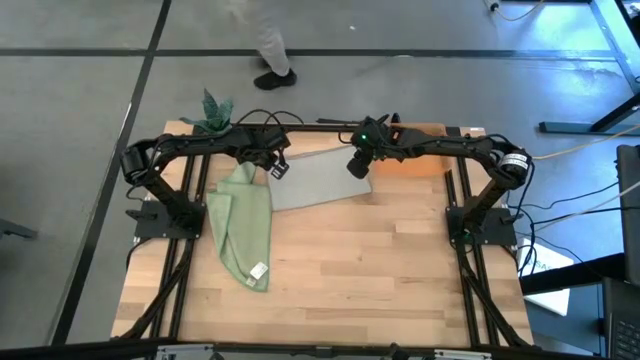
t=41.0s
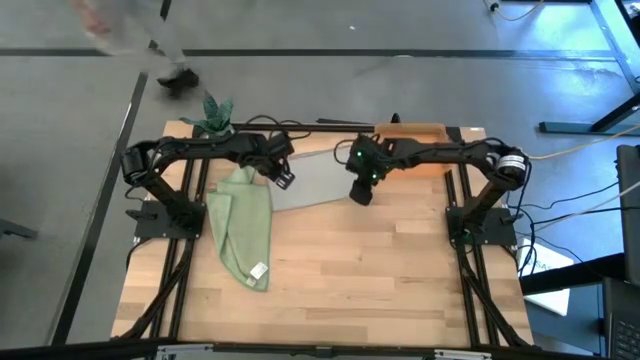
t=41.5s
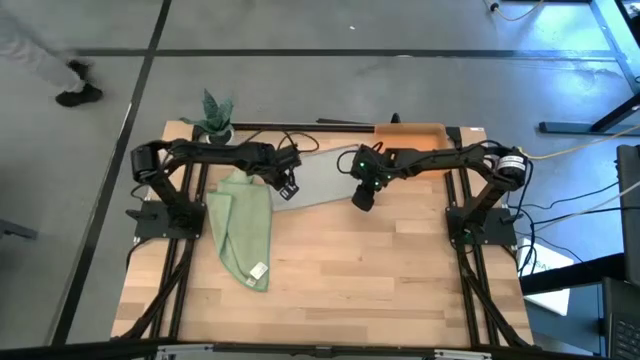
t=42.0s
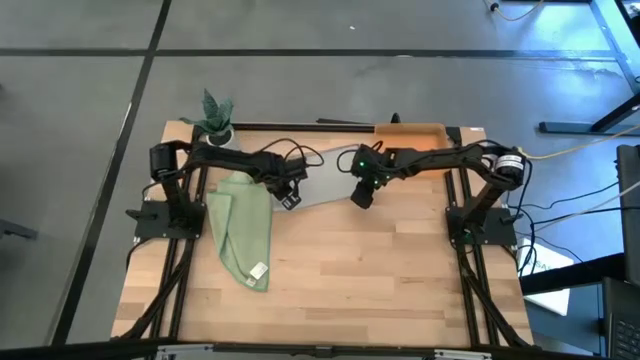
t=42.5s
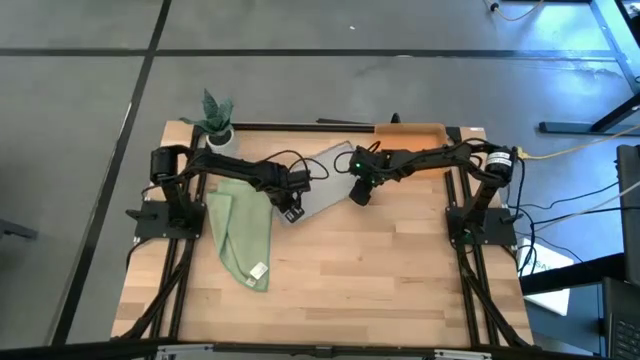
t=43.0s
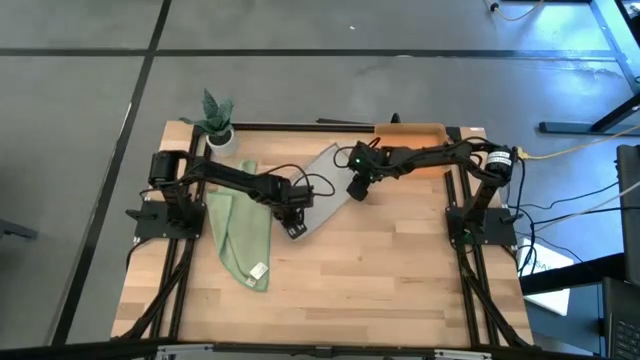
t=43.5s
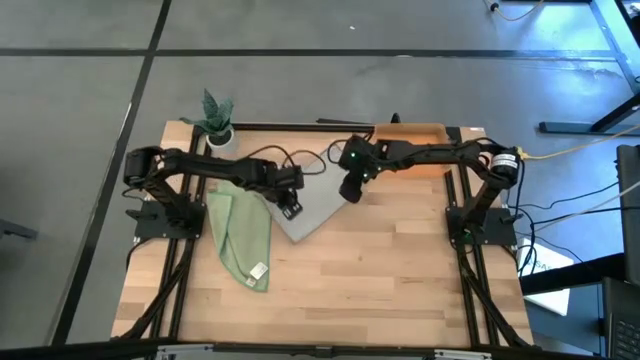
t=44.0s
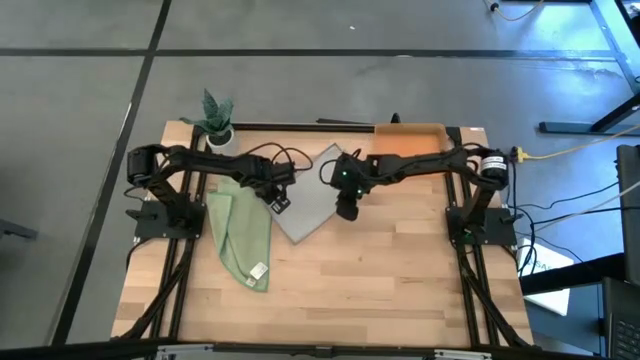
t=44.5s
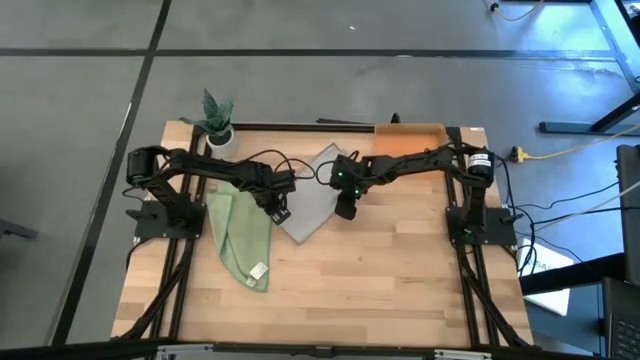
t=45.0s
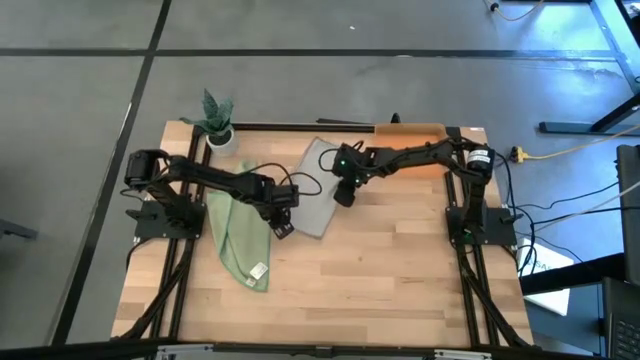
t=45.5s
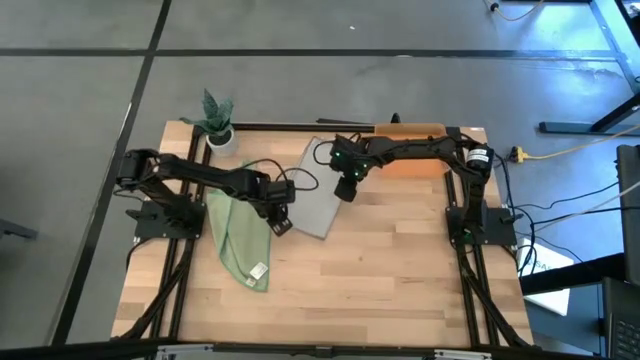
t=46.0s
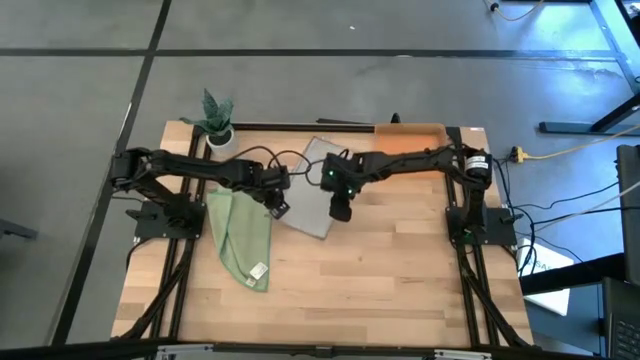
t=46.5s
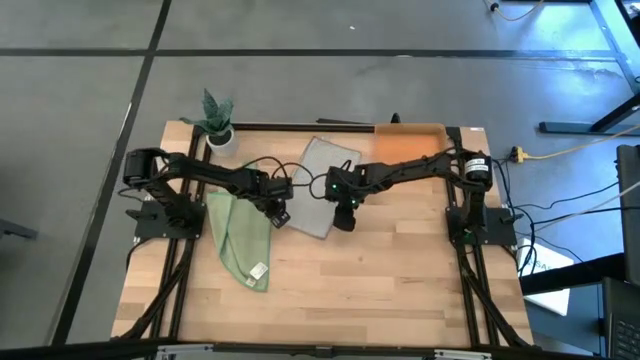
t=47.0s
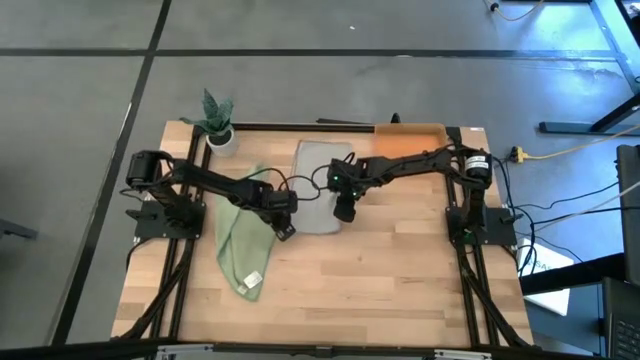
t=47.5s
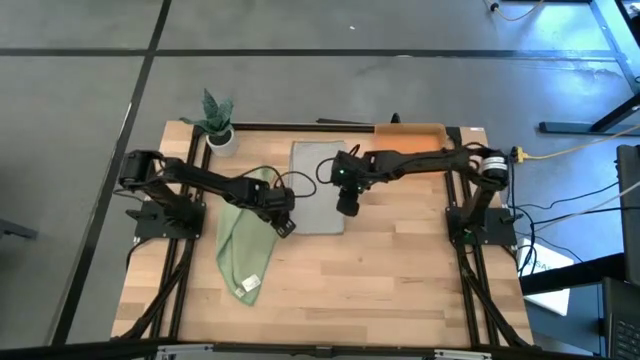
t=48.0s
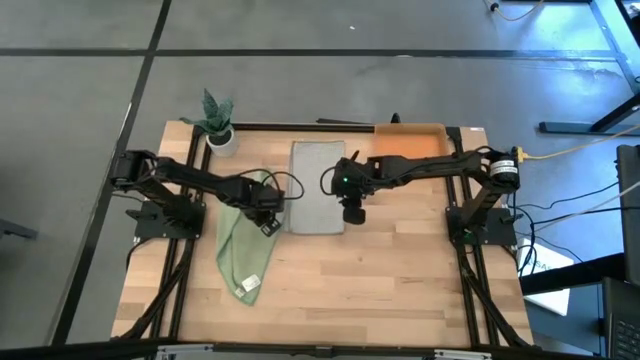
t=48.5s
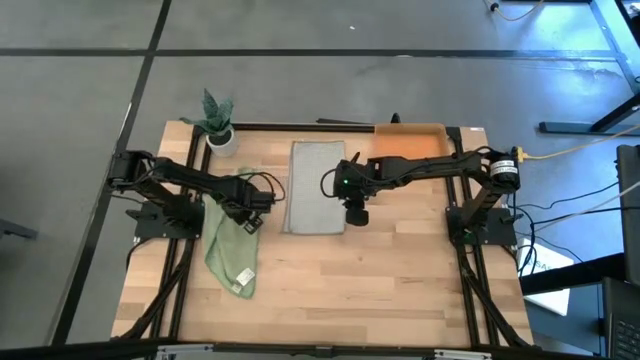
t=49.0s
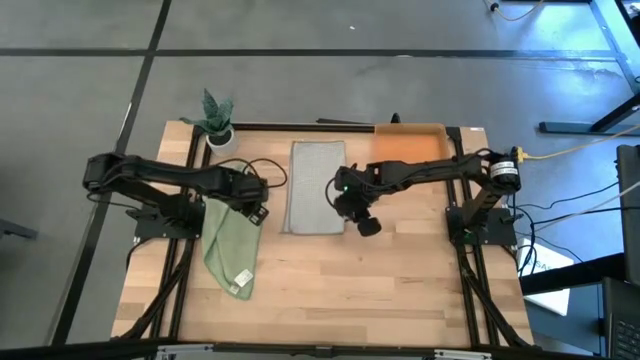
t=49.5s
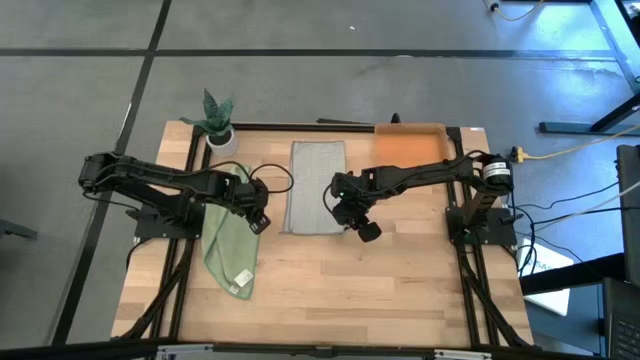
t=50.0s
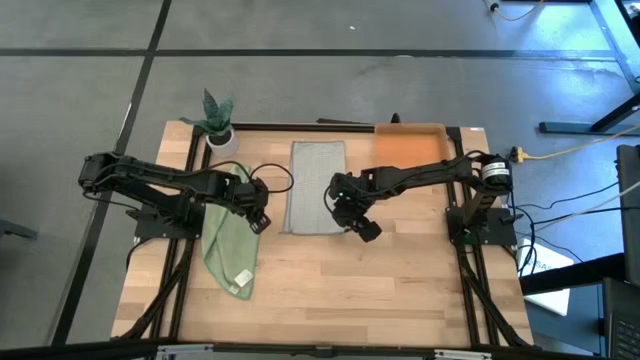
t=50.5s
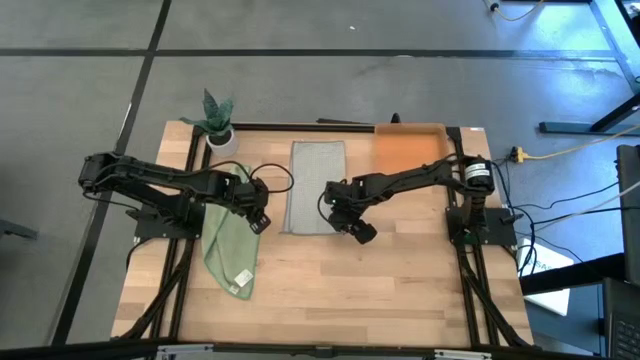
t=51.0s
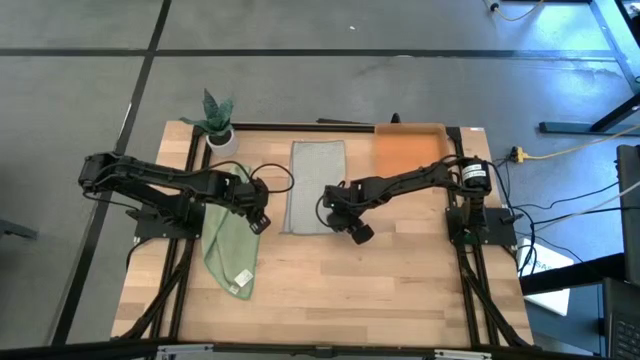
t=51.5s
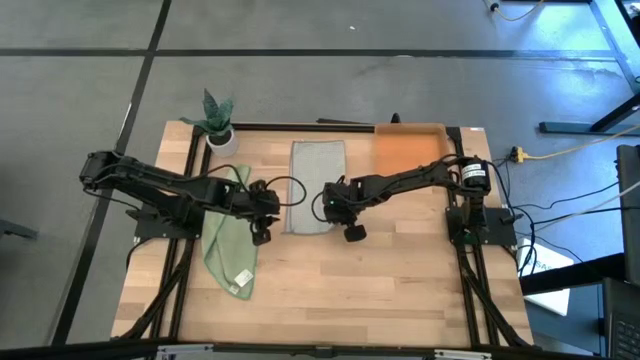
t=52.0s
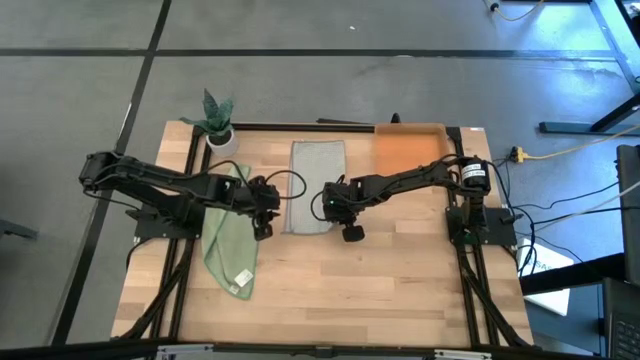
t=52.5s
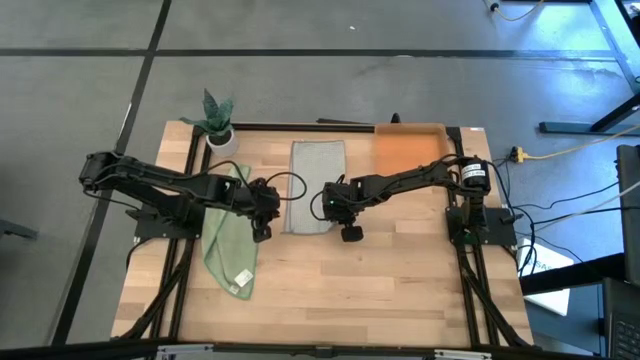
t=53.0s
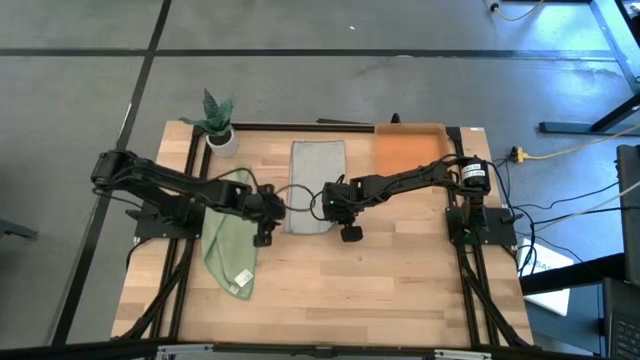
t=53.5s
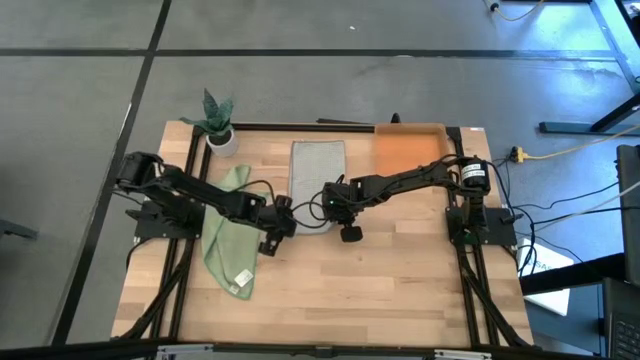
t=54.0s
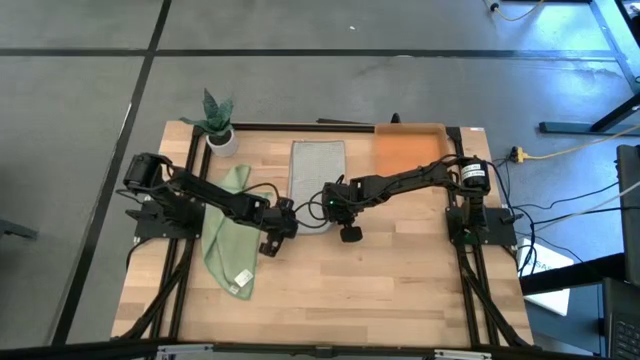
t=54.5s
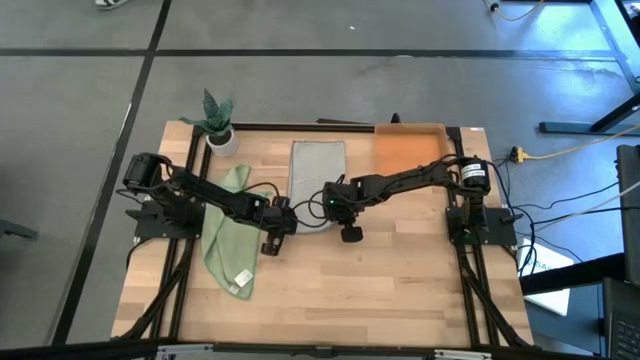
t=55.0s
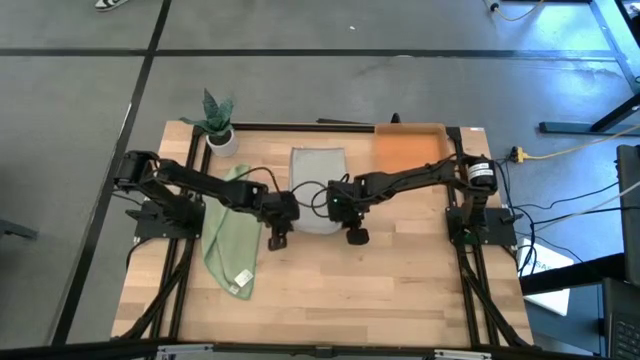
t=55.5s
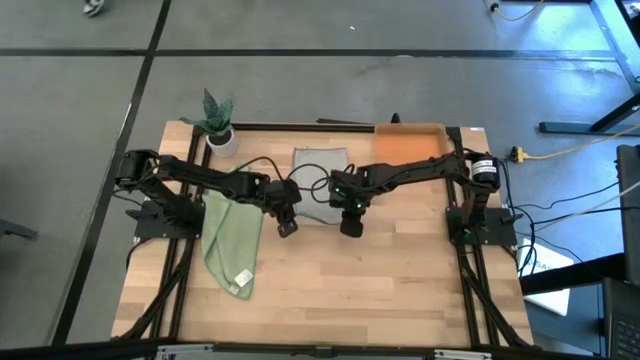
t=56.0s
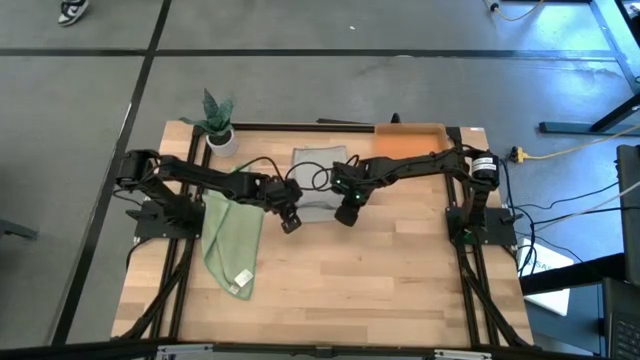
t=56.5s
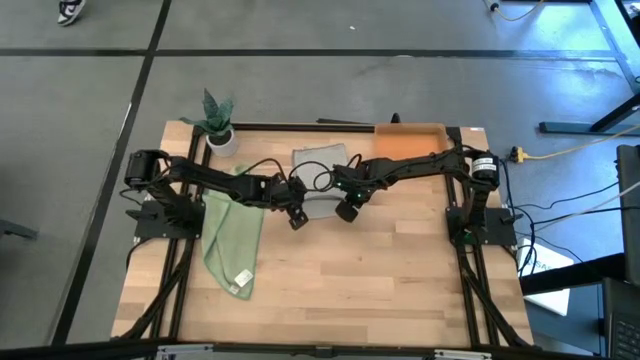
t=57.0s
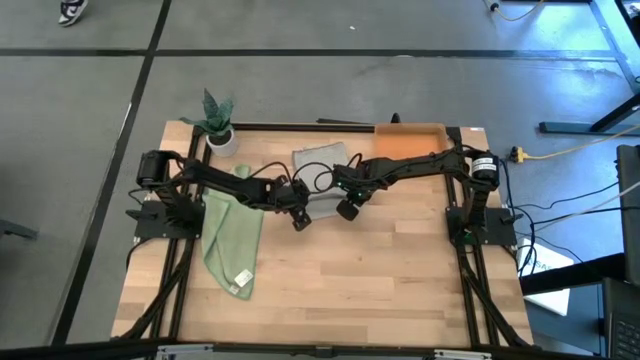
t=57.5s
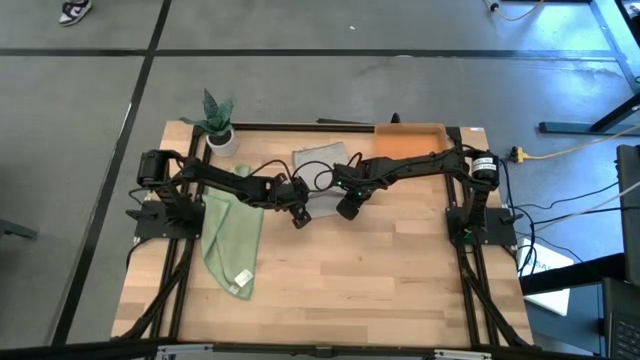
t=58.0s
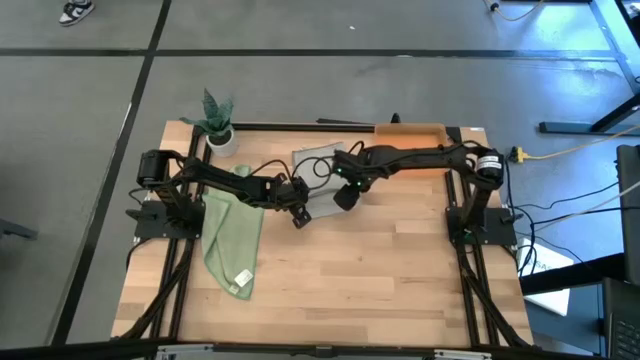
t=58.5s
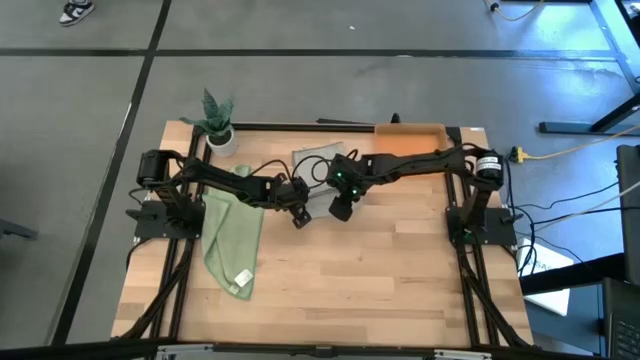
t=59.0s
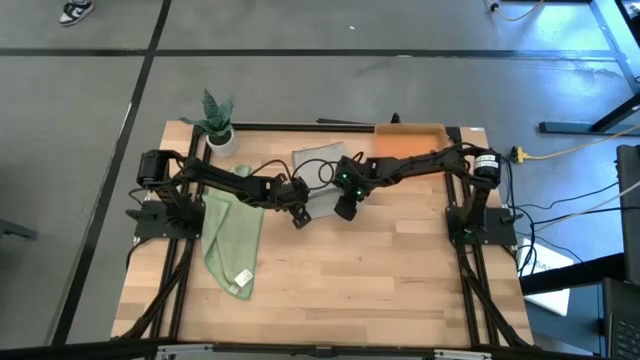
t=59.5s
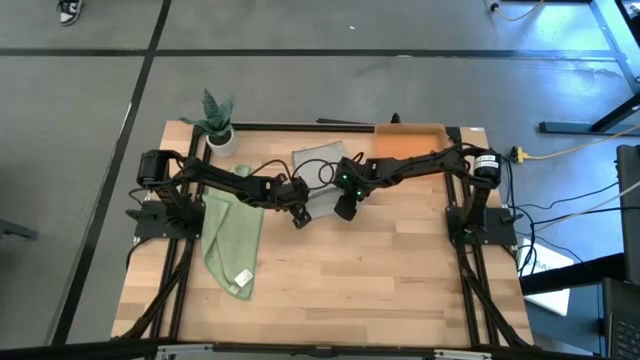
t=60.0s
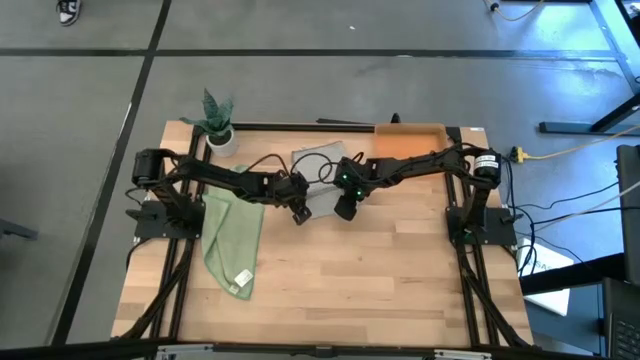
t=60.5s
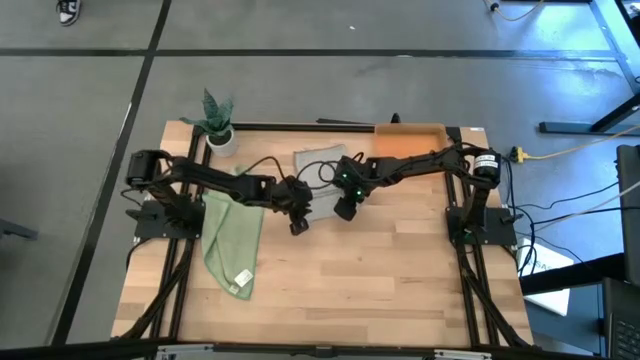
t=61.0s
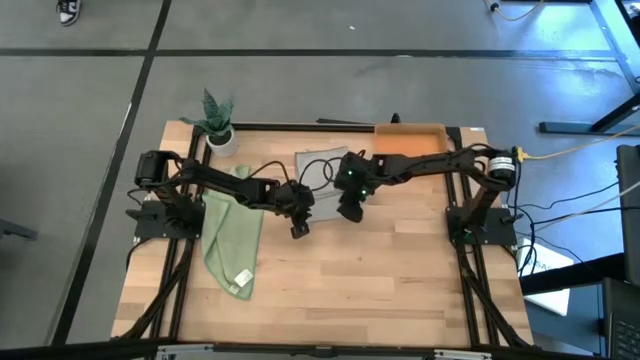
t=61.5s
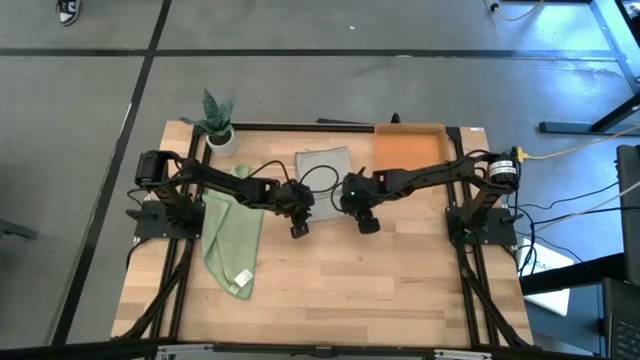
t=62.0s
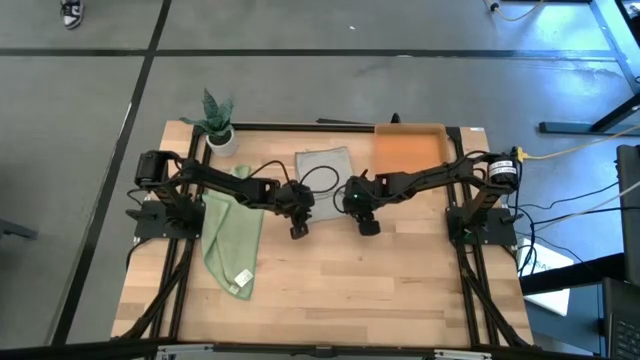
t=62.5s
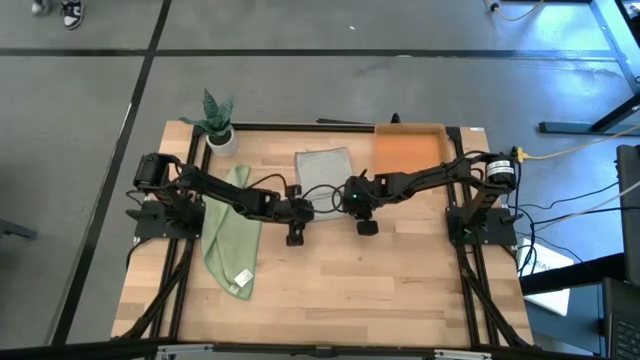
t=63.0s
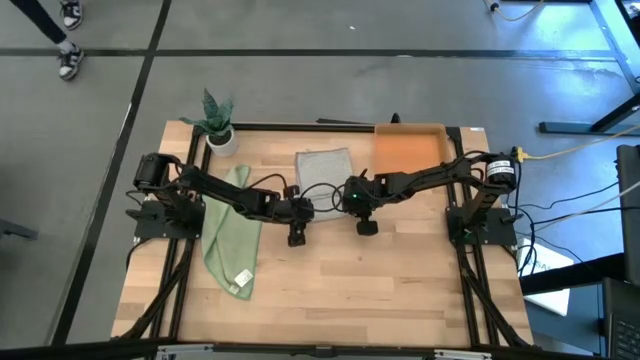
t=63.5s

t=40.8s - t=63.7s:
Task: Roll microfiber towels into tight, uniform cylinder then place into a basket
Roll the gray microfiber towel
